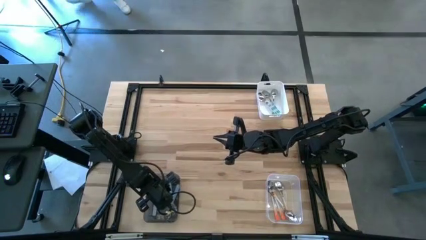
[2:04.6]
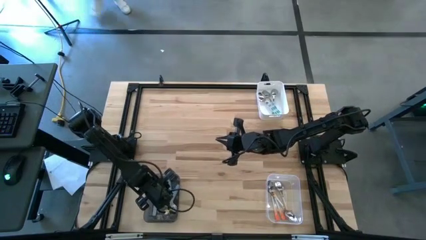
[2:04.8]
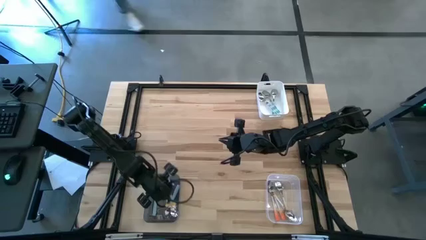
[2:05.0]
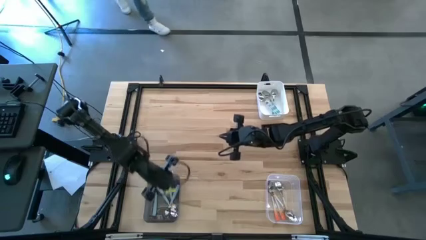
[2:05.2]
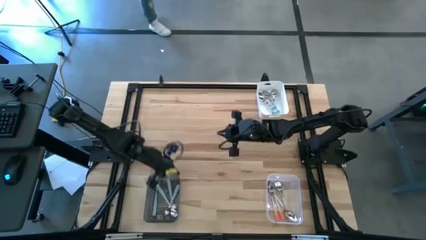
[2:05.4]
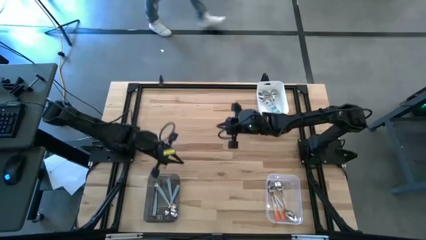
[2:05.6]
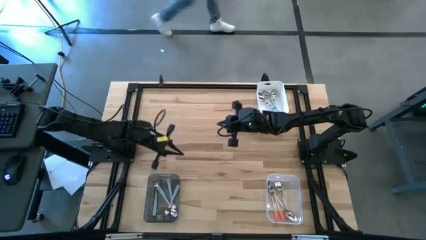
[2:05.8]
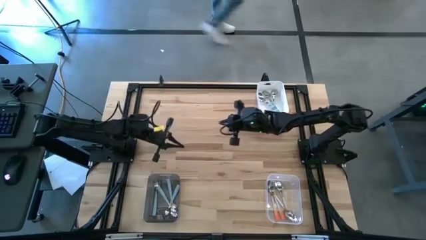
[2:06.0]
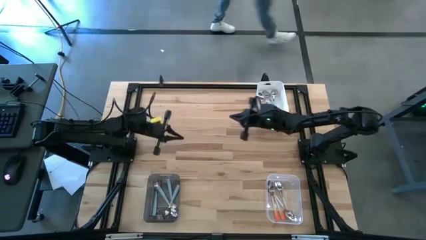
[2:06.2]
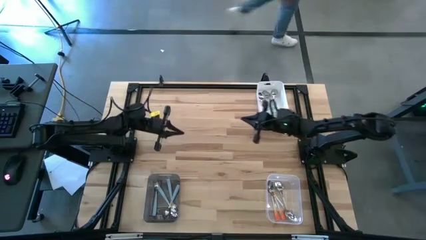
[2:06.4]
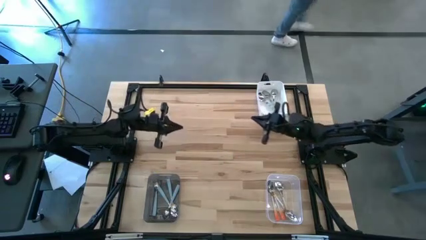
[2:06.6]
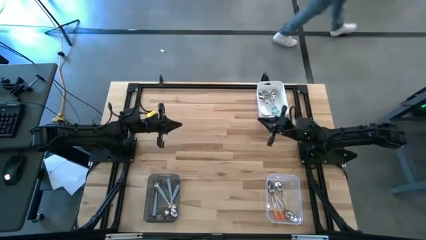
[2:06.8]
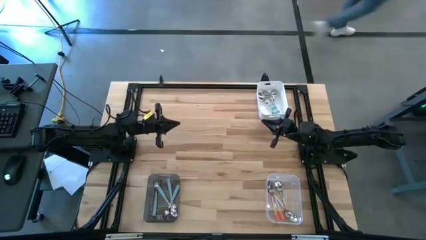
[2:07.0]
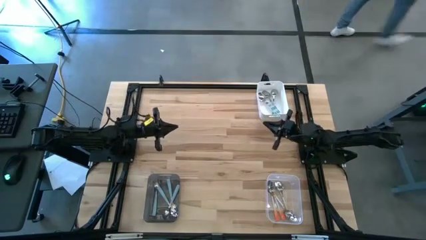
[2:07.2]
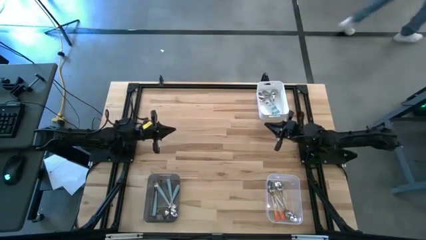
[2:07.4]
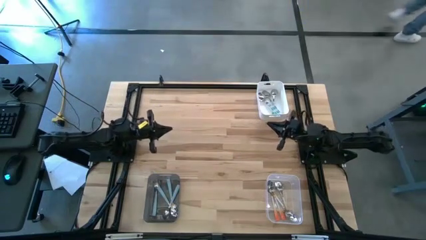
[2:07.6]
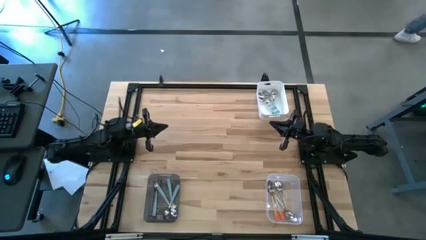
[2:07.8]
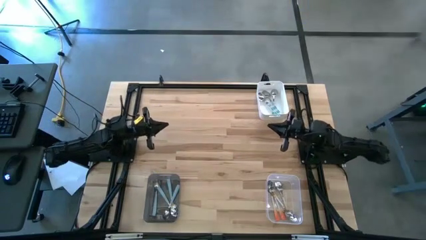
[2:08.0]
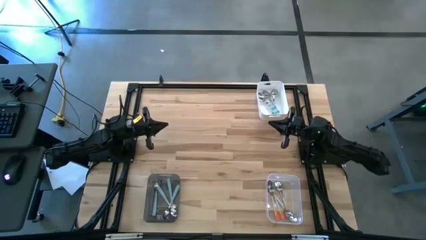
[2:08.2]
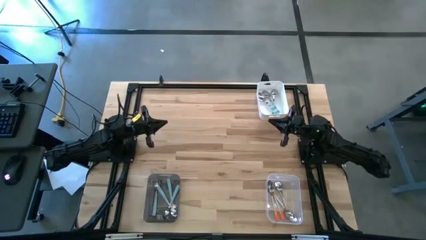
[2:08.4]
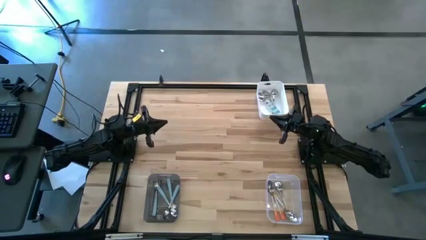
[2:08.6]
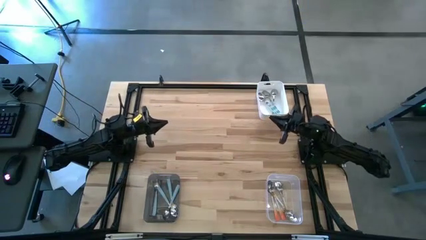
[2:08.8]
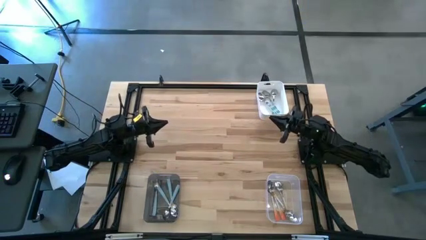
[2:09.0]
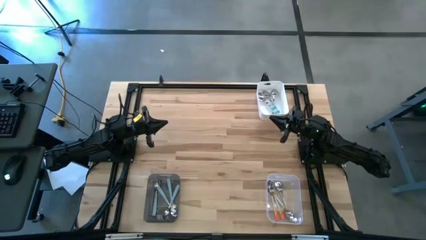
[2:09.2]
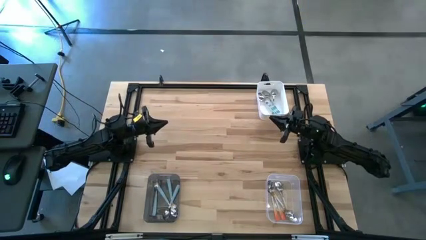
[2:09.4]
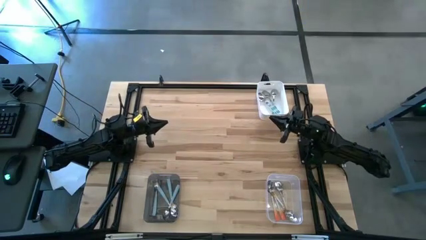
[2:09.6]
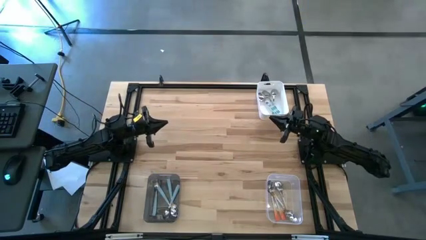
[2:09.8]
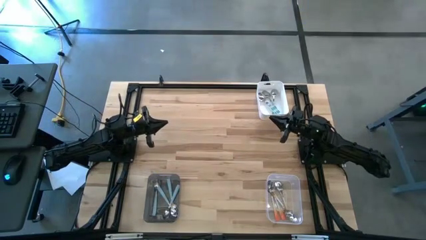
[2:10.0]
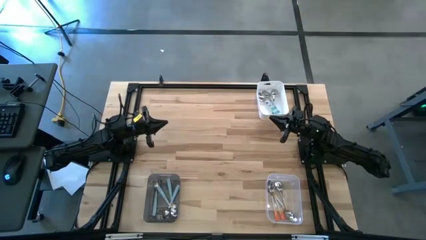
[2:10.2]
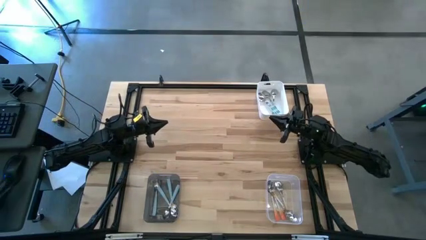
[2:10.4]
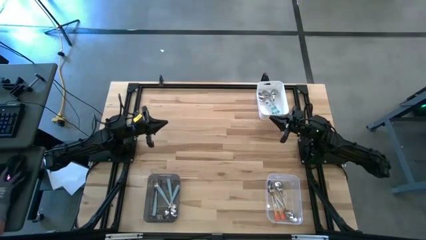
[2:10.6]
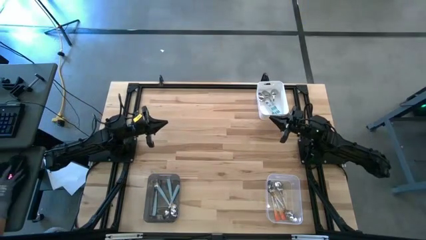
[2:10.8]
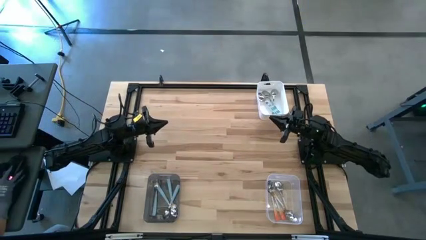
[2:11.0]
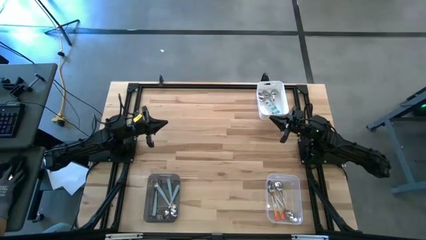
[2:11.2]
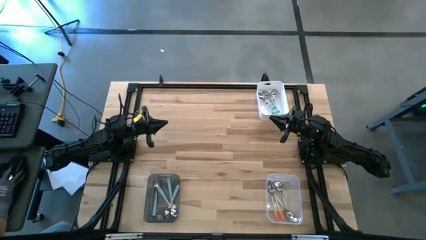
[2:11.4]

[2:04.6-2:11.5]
Task: Sort silverware by color (type)
Return to Home Position

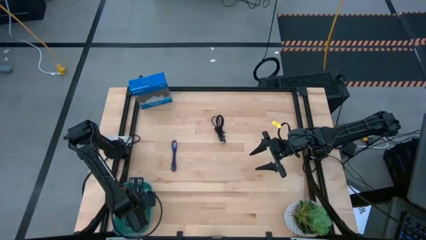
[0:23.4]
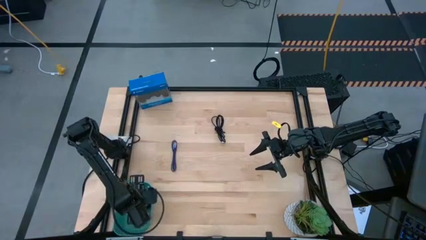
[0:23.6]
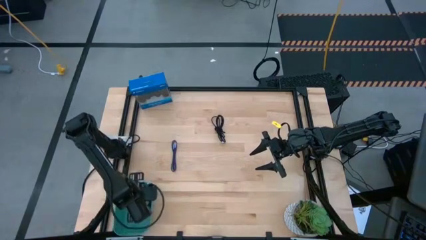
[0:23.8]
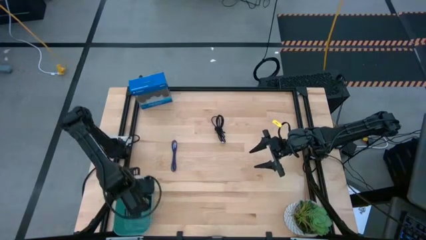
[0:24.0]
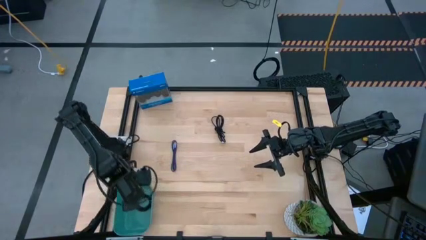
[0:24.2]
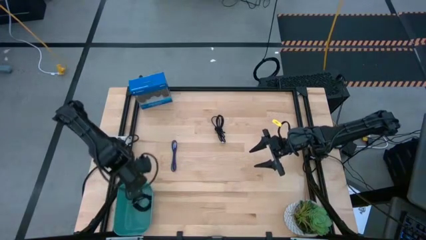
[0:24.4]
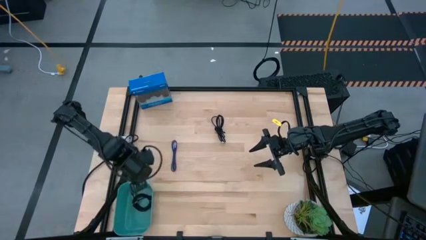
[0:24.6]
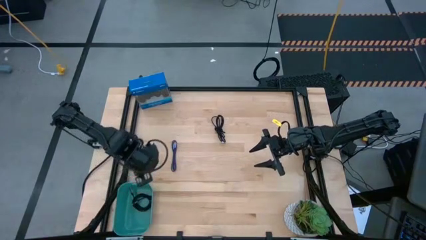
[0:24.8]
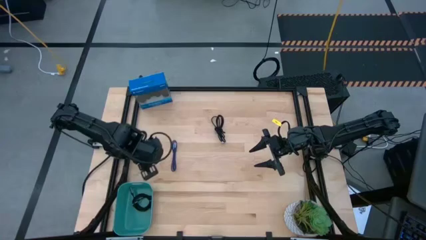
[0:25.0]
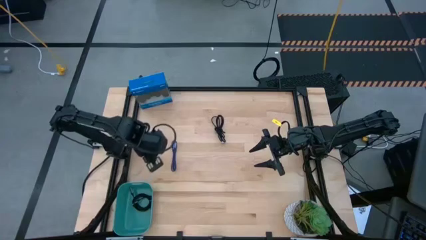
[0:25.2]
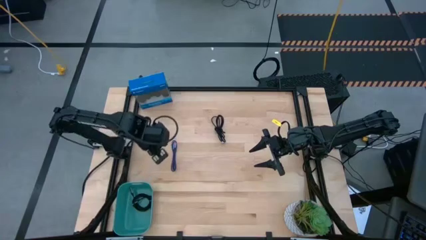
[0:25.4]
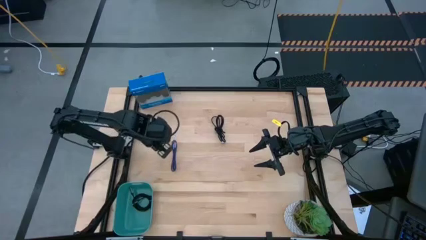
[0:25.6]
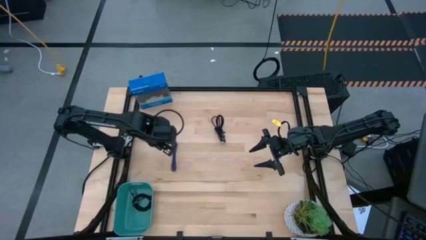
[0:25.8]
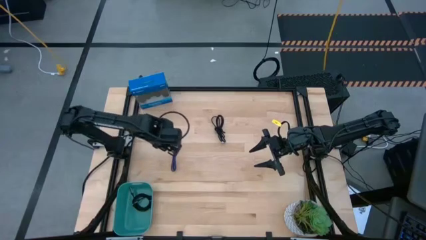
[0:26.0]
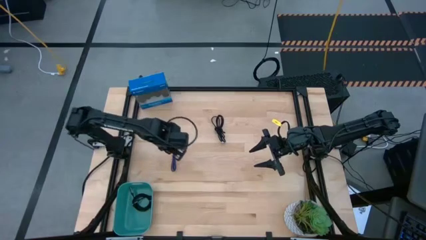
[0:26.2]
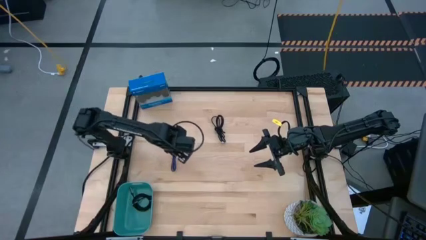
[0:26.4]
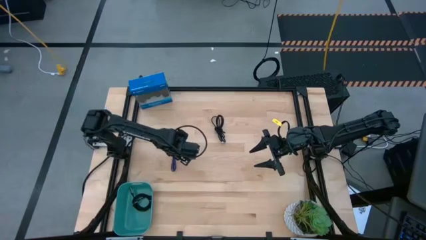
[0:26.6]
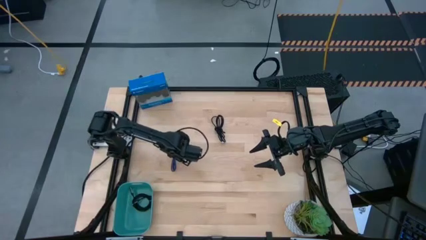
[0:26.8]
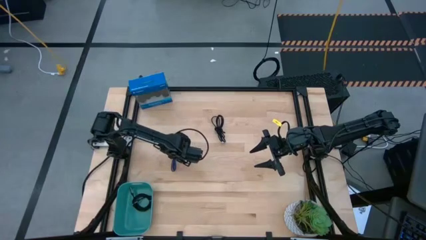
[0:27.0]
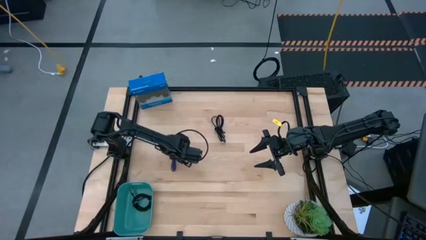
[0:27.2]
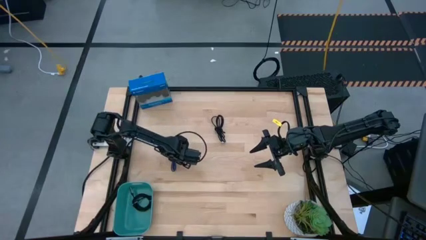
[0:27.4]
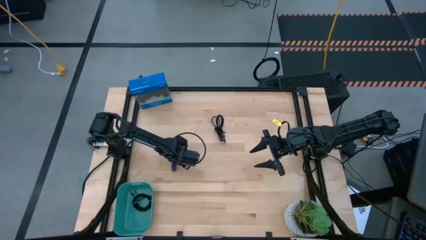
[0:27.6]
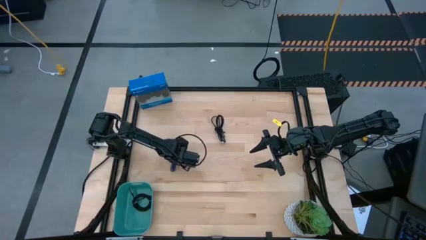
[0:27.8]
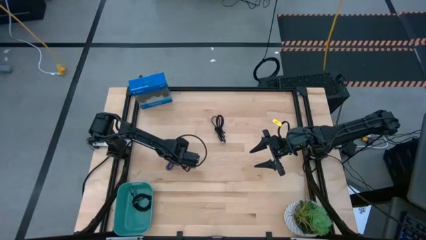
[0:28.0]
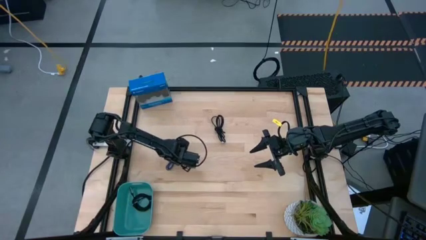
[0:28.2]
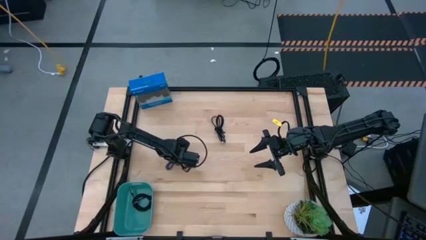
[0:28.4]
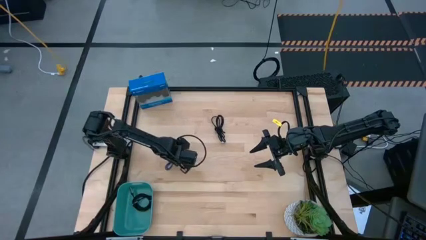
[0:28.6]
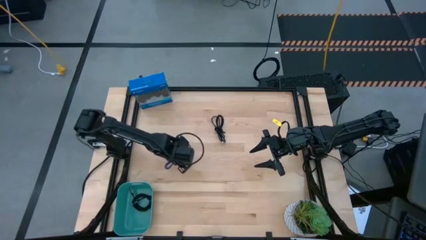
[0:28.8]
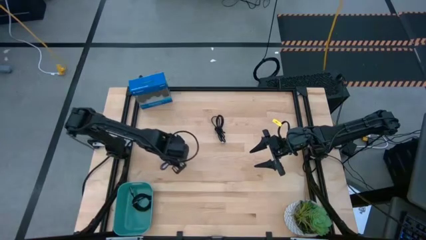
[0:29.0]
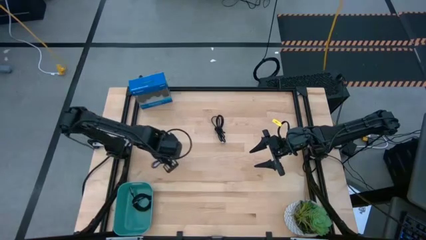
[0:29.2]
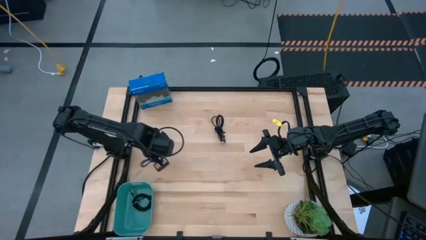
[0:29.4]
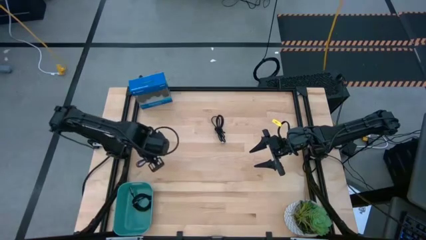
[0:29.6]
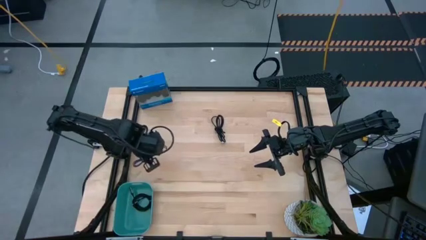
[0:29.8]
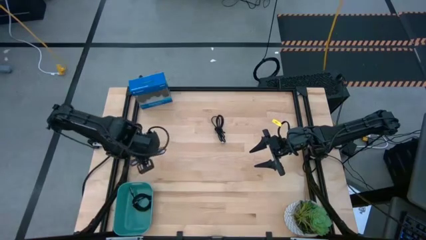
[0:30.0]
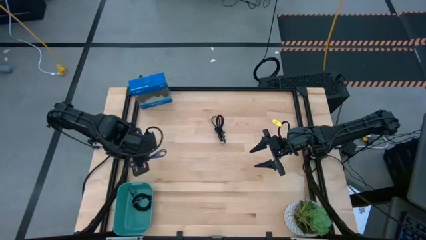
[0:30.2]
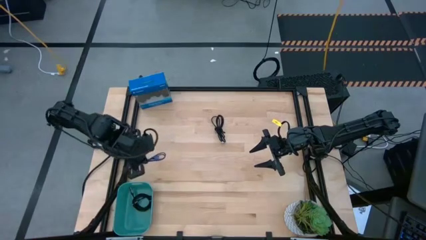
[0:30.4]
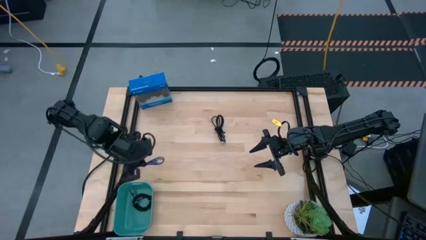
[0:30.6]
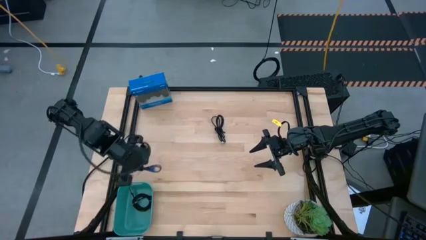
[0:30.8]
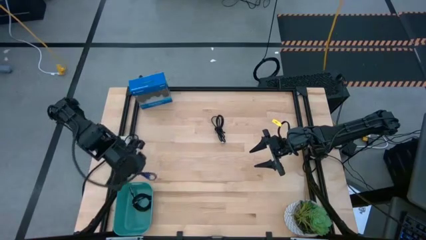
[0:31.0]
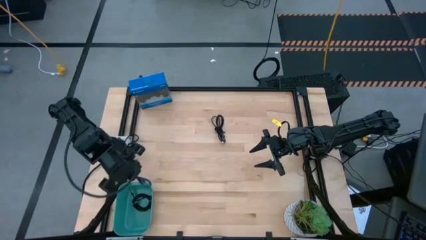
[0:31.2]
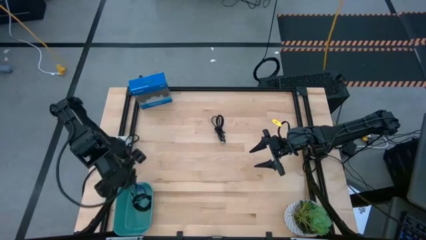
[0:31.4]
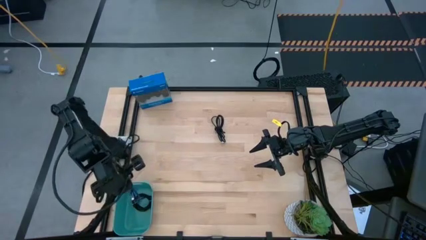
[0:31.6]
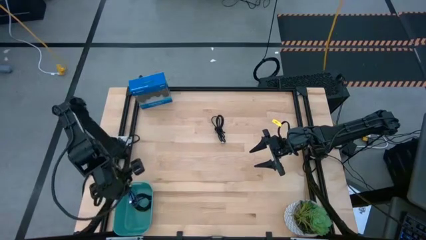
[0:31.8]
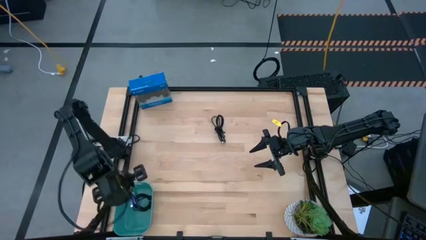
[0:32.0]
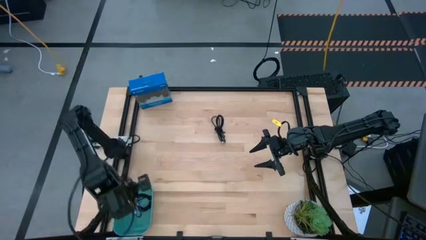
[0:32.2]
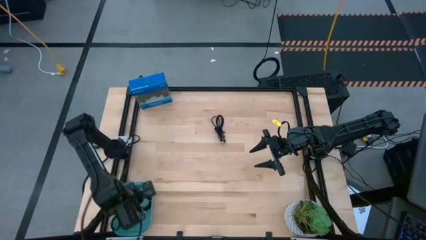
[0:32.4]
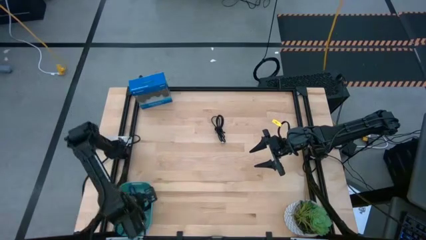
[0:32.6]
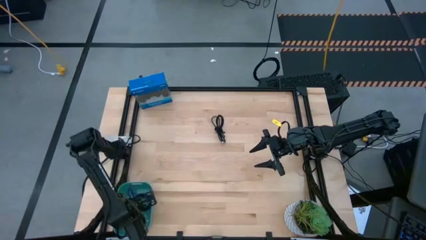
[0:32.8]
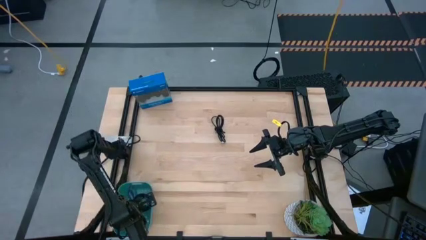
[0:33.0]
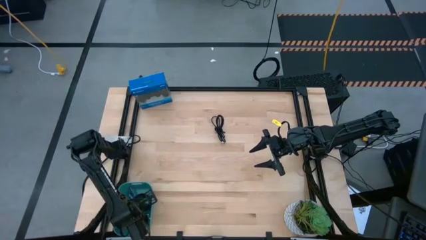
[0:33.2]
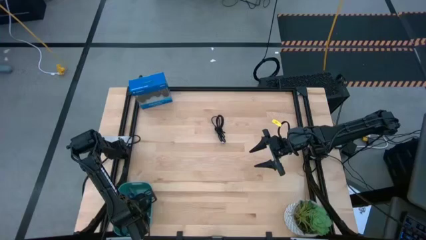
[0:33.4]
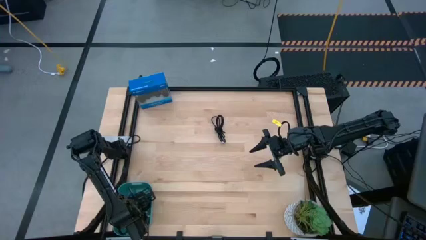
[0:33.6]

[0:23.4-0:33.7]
Task: Pick and place USB-C Cables
Put the purple cable into the blue basket
